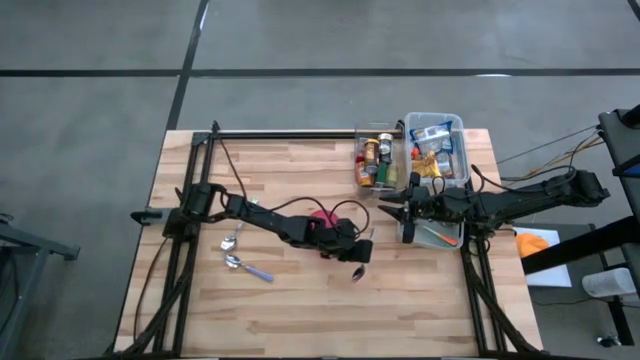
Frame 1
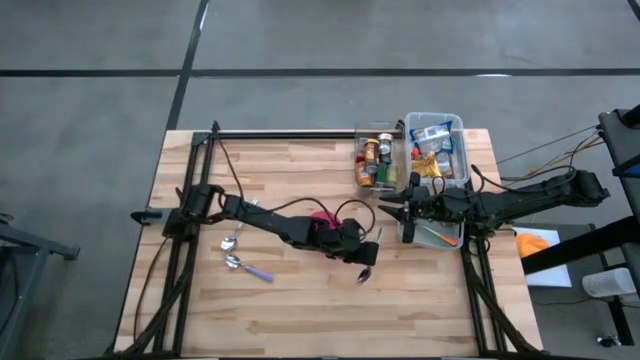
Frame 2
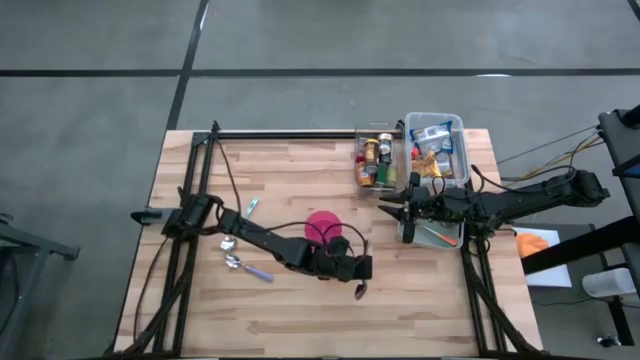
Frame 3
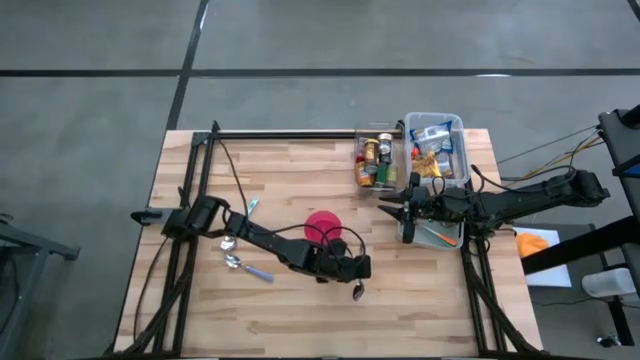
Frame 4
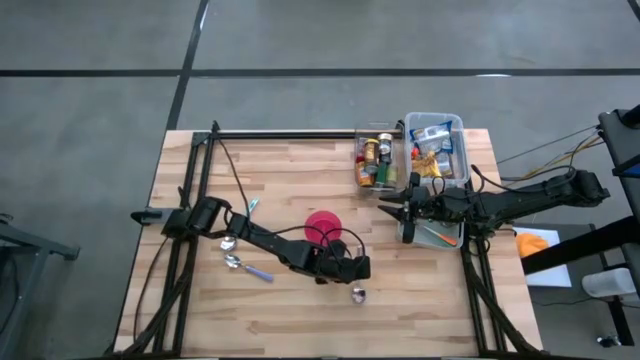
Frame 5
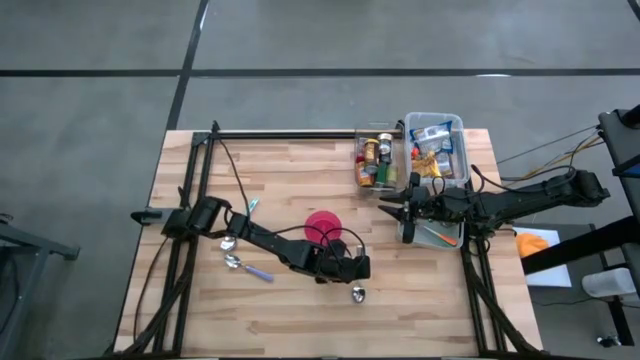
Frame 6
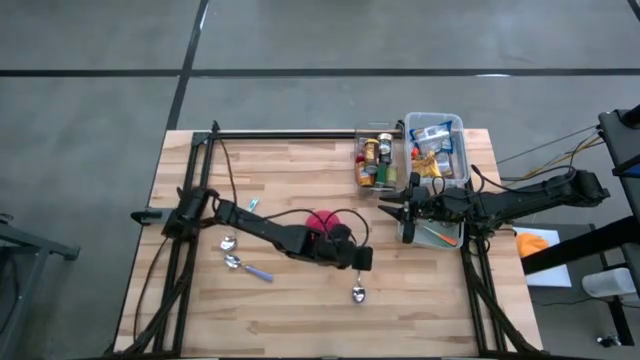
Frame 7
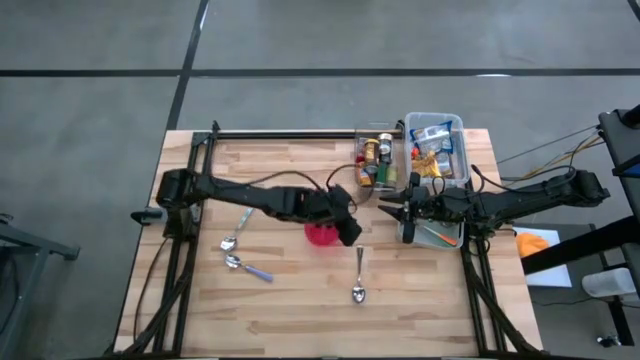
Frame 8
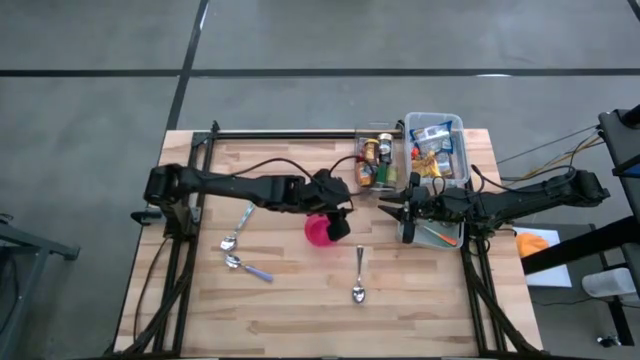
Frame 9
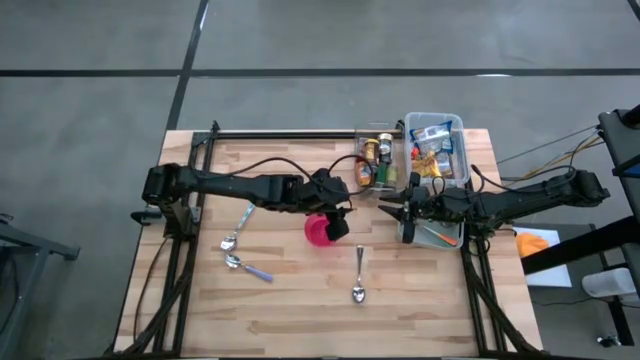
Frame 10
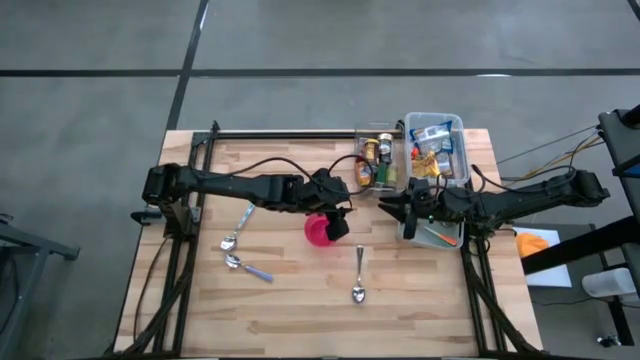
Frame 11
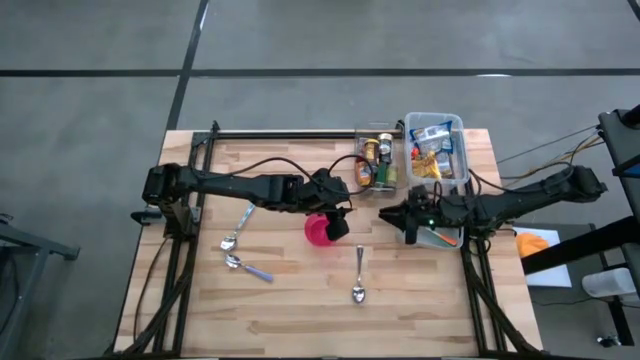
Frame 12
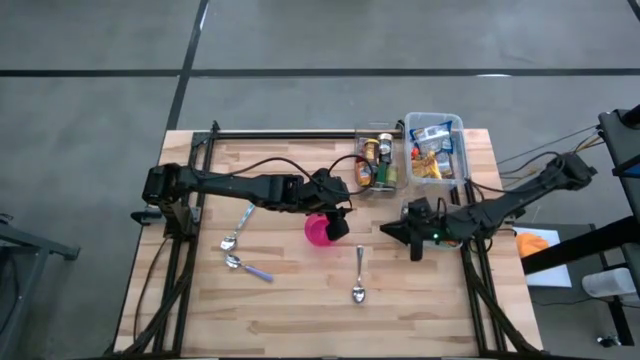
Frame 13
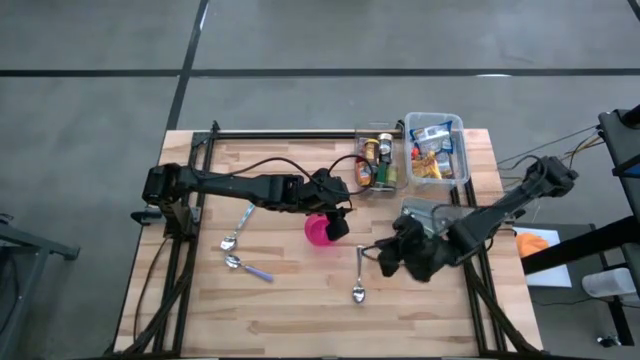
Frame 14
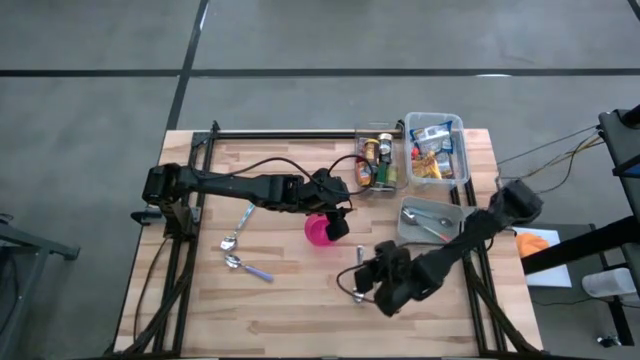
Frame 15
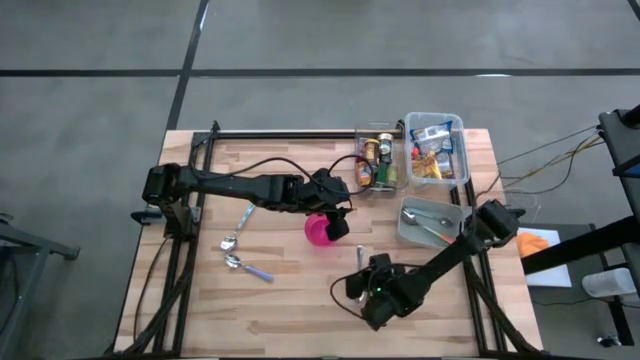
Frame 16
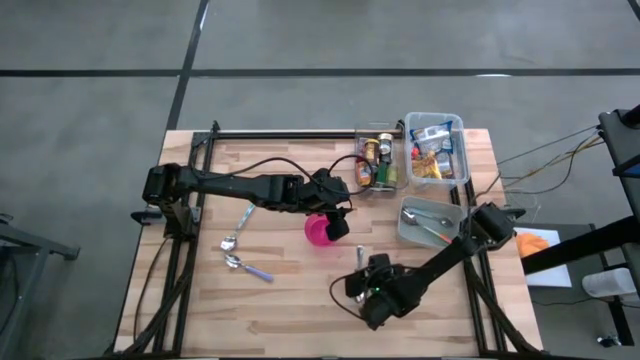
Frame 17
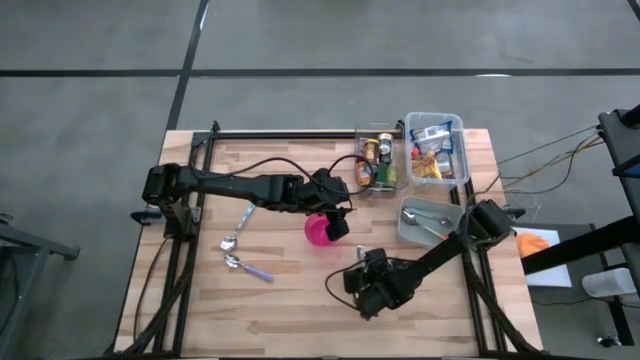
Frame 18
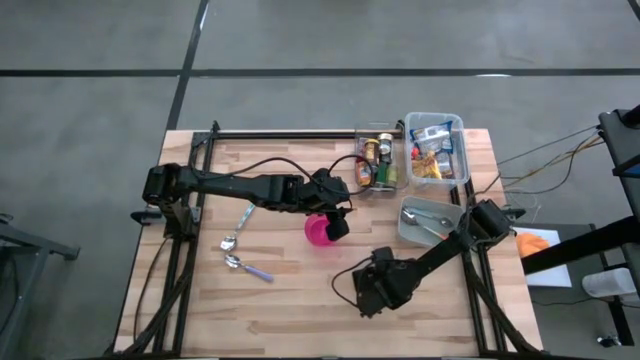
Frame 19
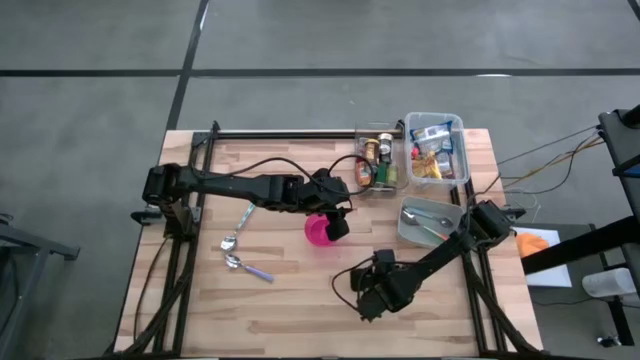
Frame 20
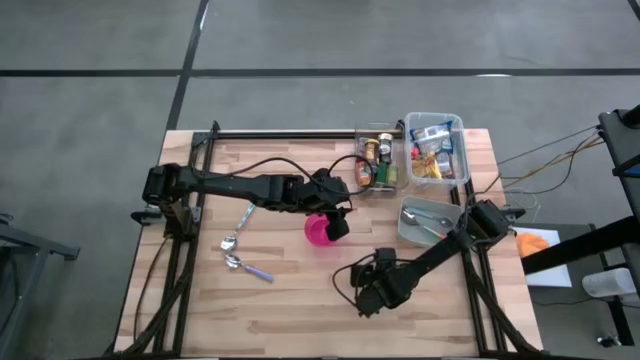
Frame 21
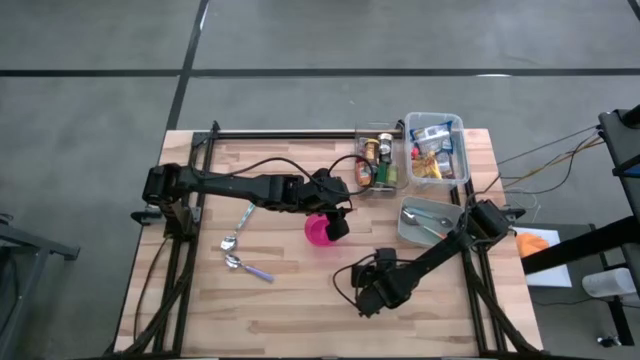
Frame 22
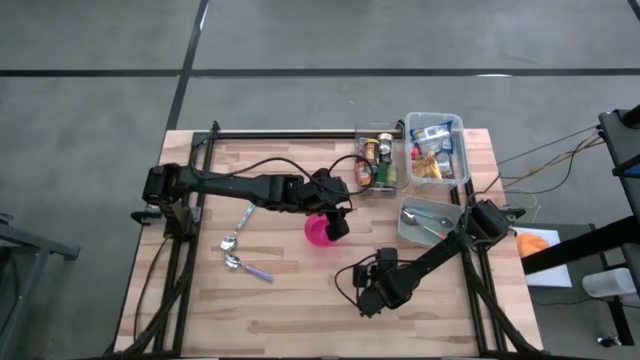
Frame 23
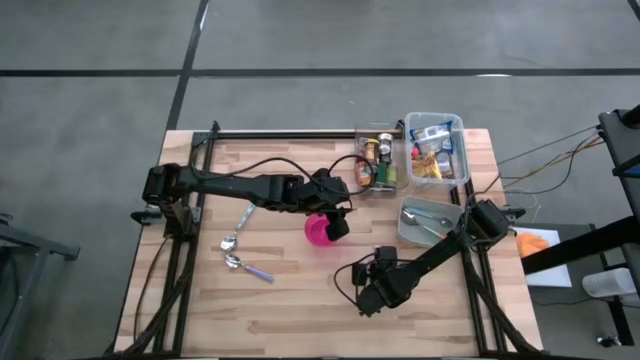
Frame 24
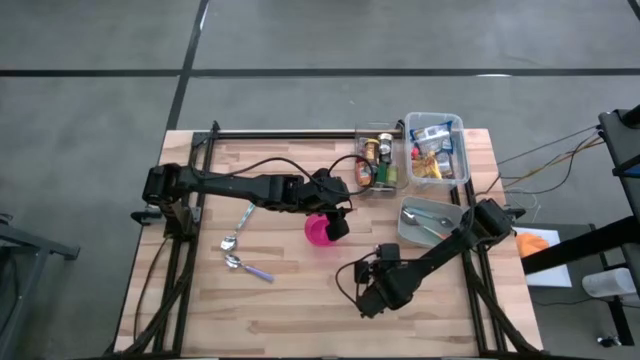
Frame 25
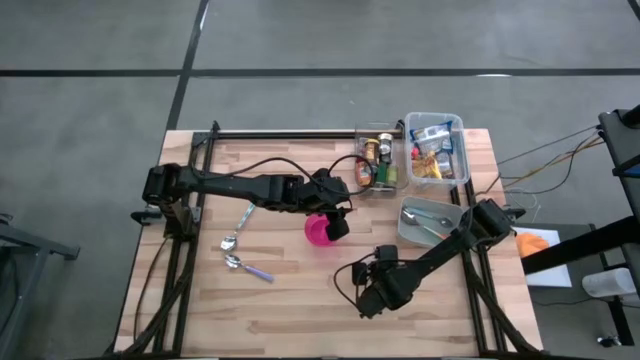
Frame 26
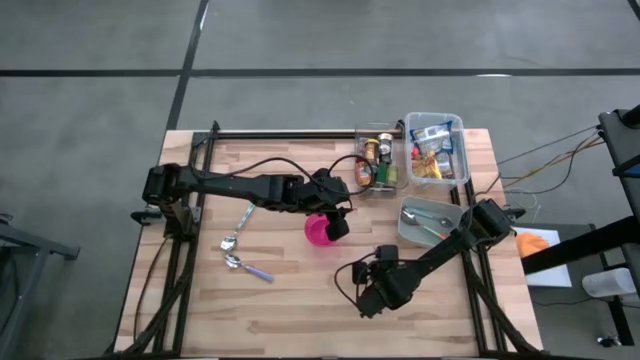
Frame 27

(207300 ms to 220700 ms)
Put the silver spoon into the gray bin

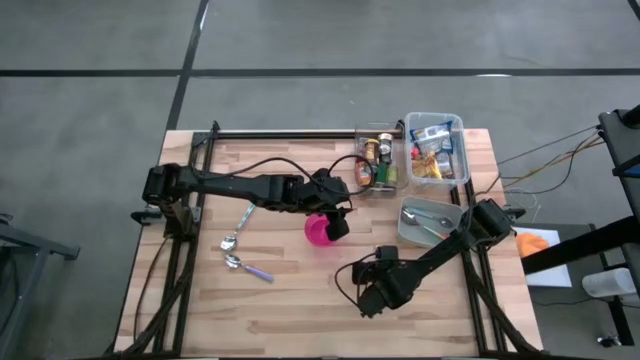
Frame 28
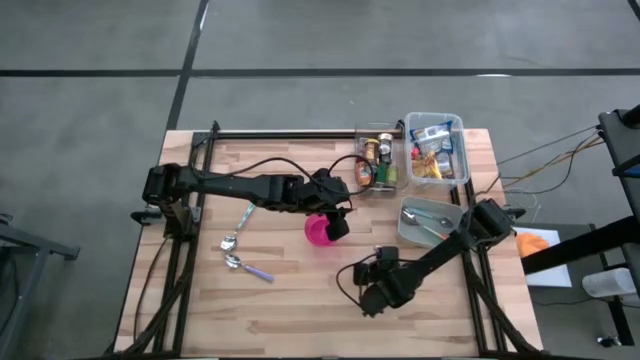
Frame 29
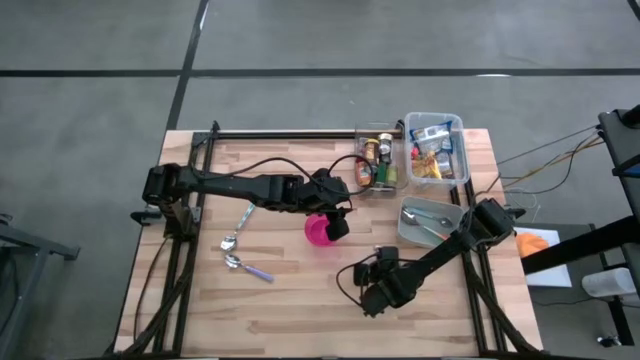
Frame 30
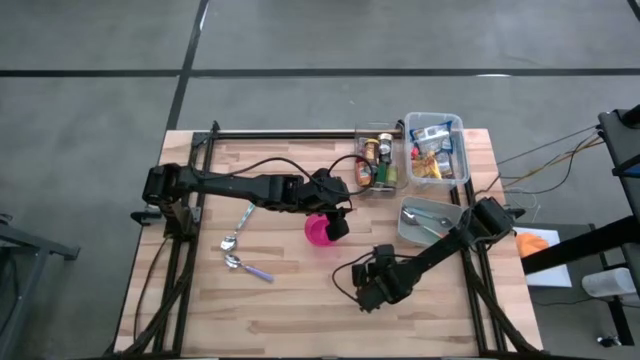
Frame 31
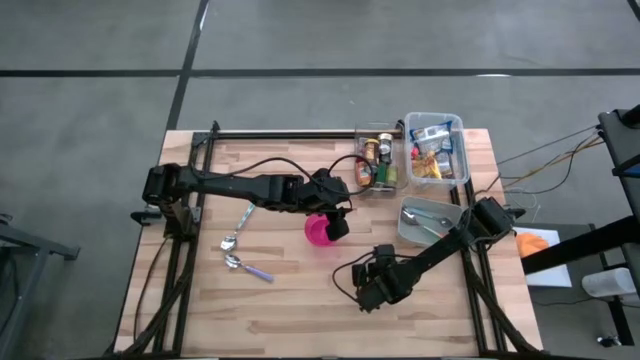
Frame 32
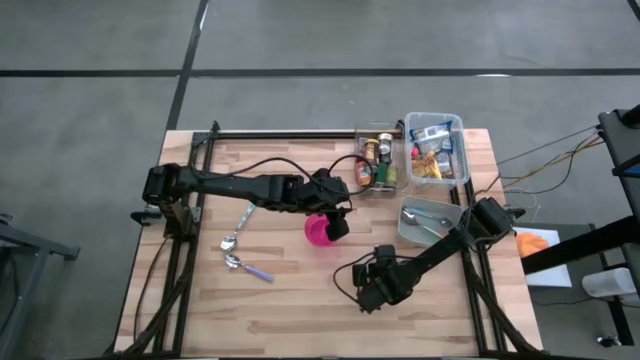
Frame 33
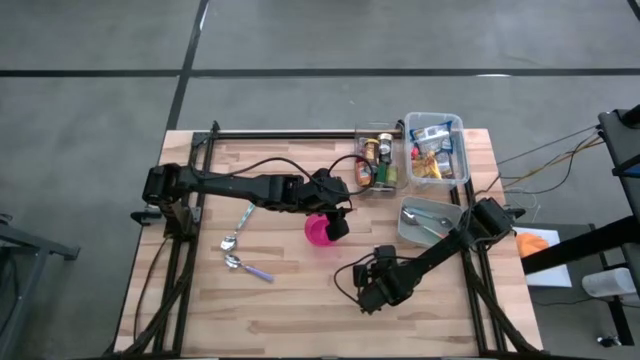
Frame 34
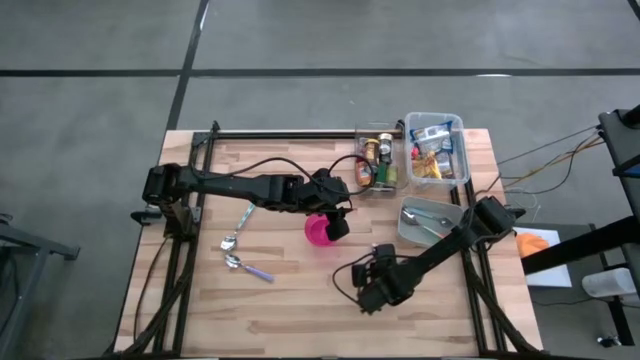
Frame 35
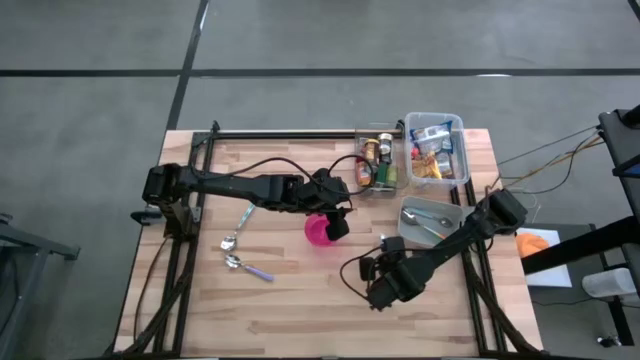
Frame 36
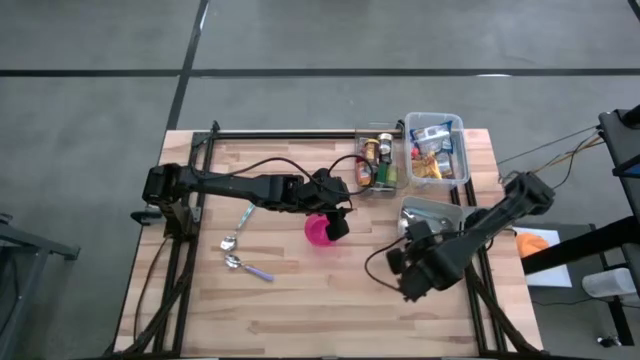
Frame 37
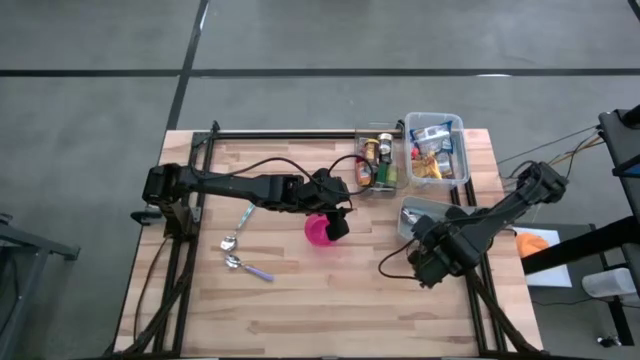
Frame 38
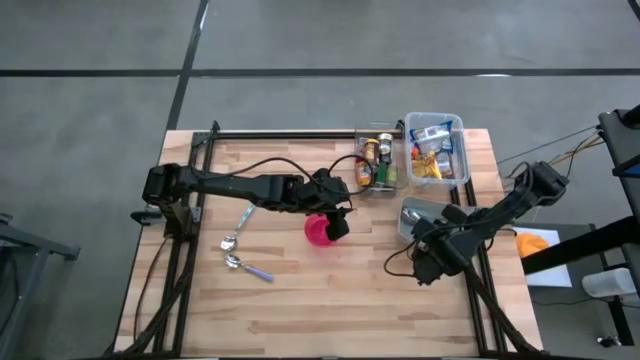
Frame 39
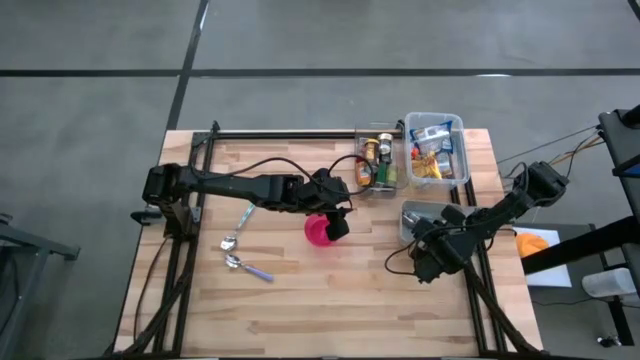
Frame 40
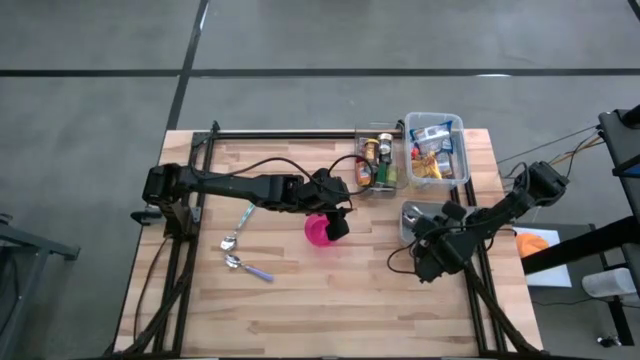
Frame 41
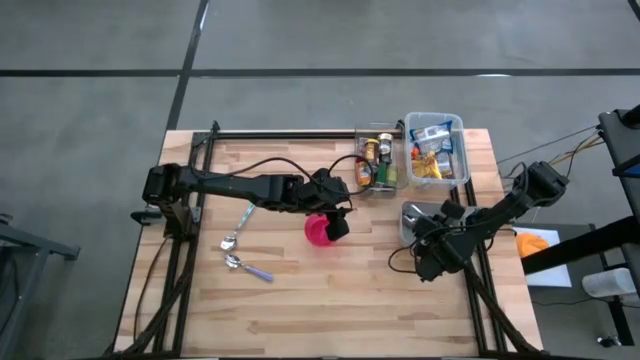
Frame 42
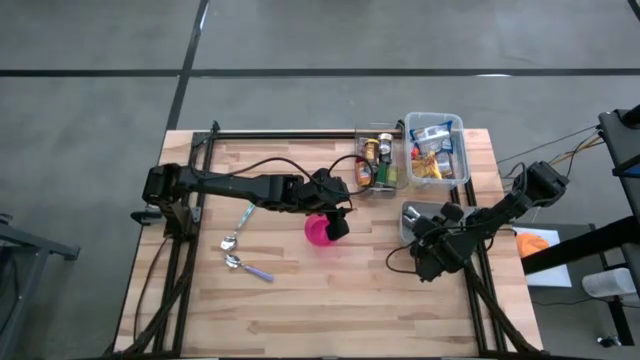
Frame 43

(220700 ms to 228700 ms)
Put the silver spoon into the gray bin
